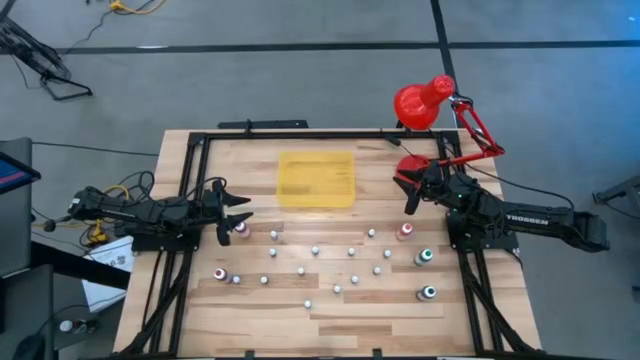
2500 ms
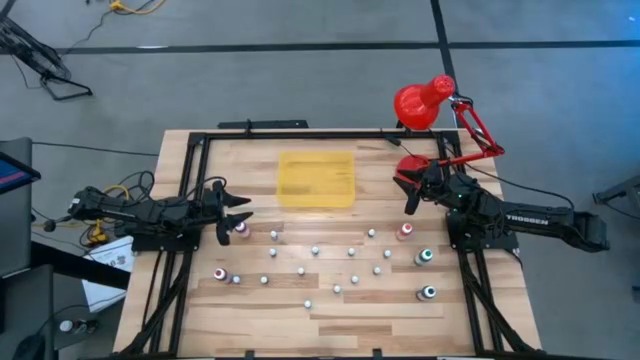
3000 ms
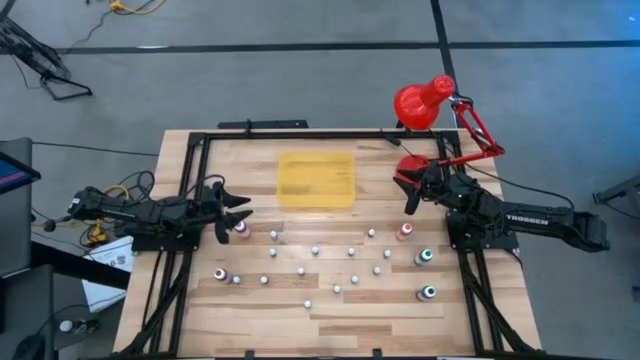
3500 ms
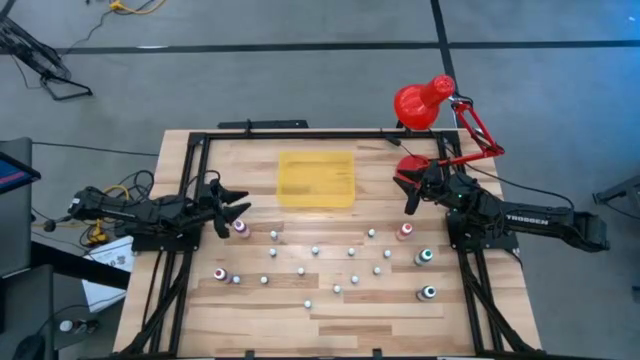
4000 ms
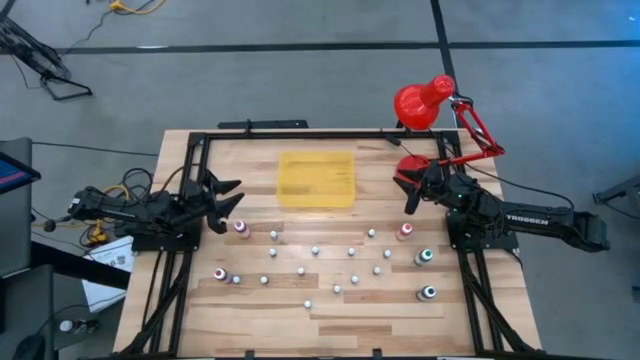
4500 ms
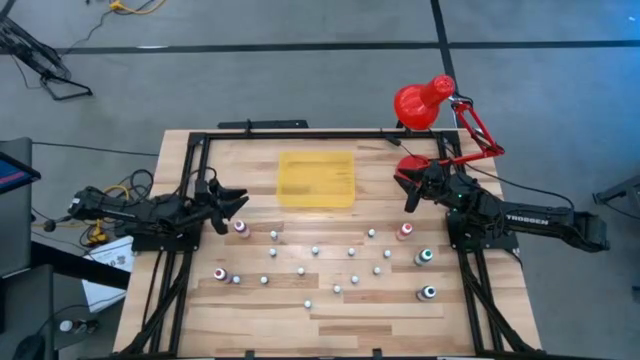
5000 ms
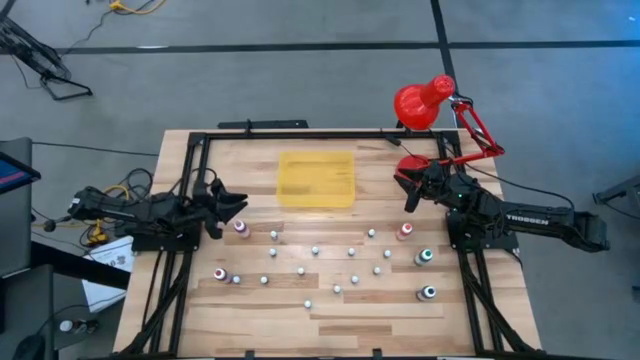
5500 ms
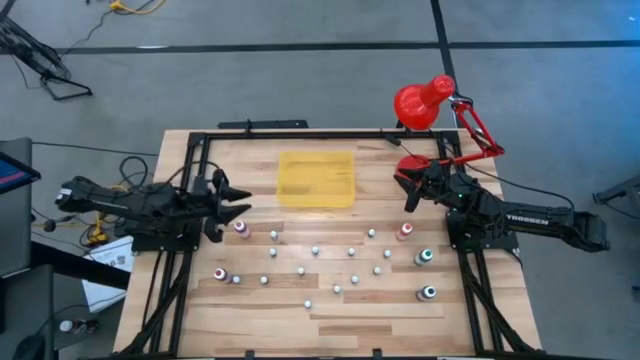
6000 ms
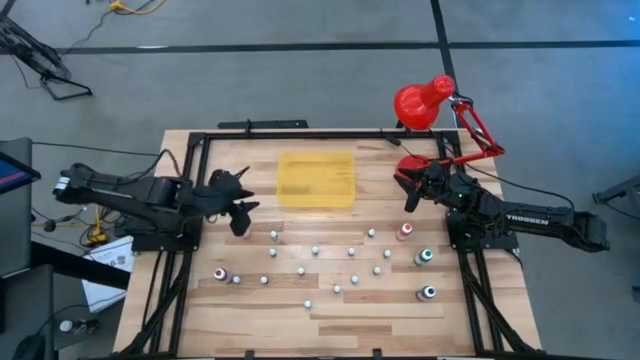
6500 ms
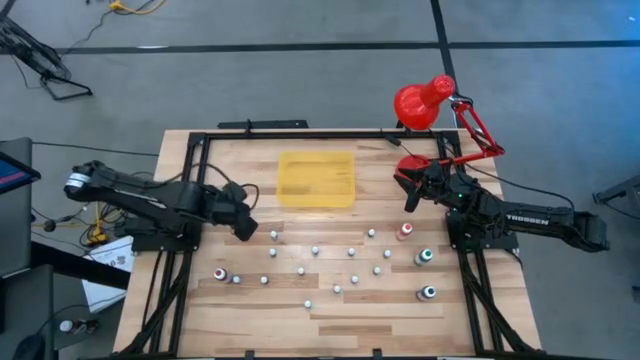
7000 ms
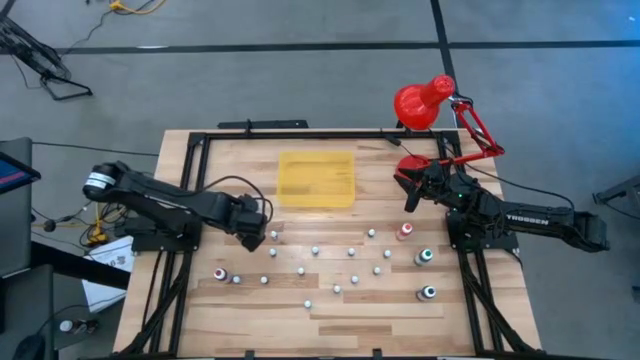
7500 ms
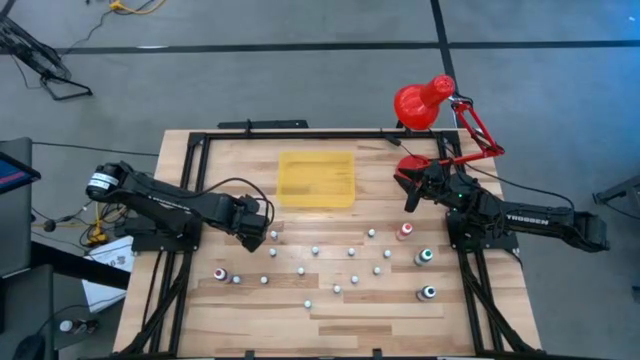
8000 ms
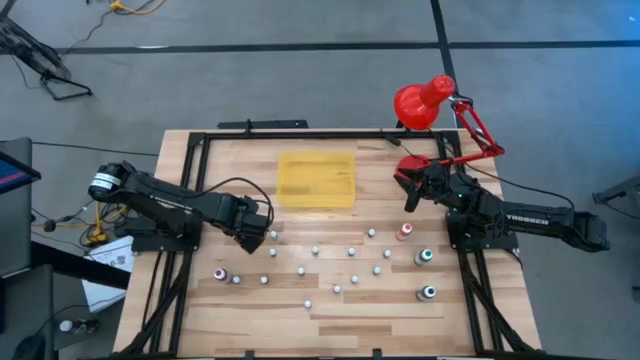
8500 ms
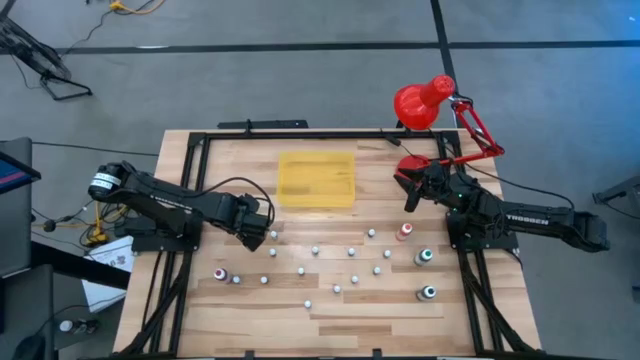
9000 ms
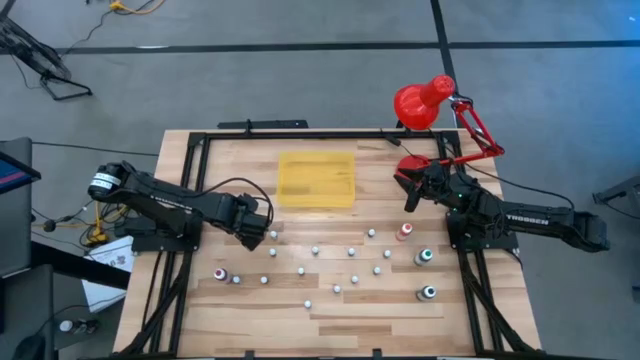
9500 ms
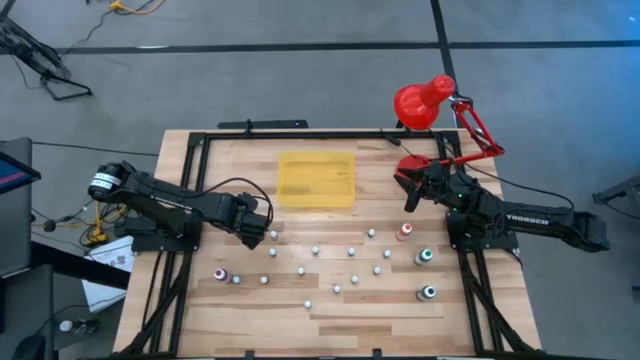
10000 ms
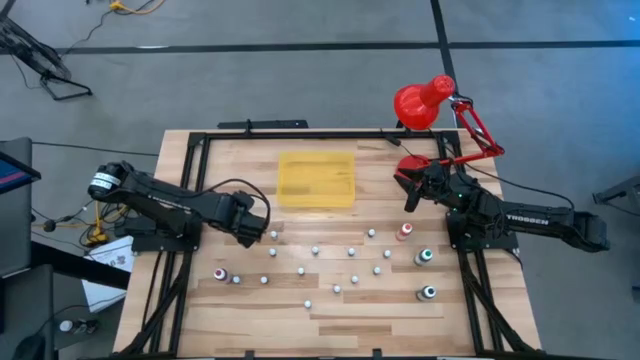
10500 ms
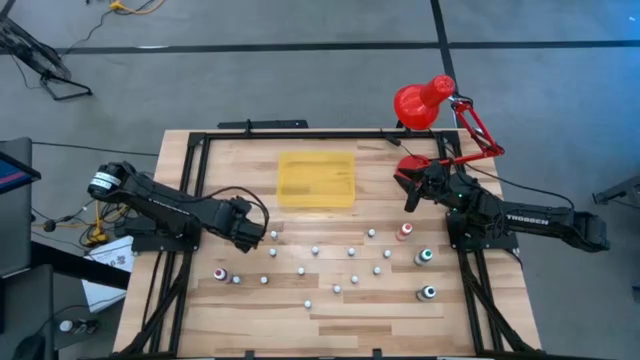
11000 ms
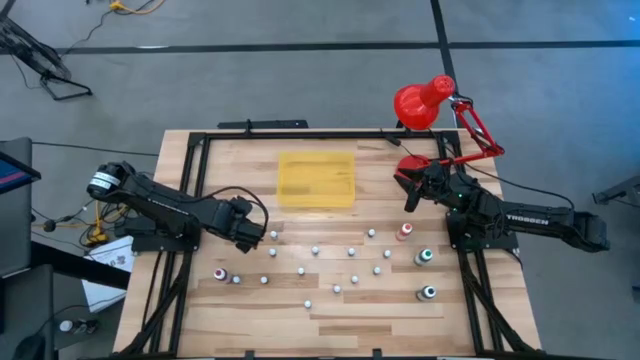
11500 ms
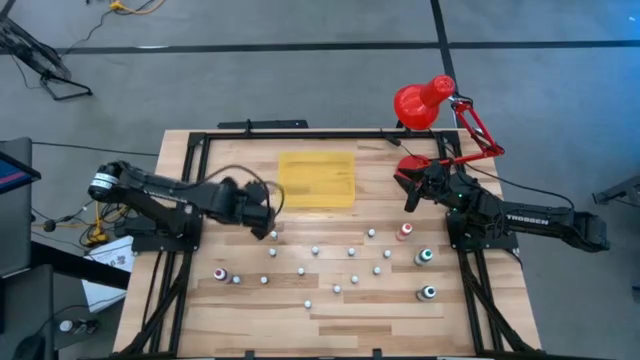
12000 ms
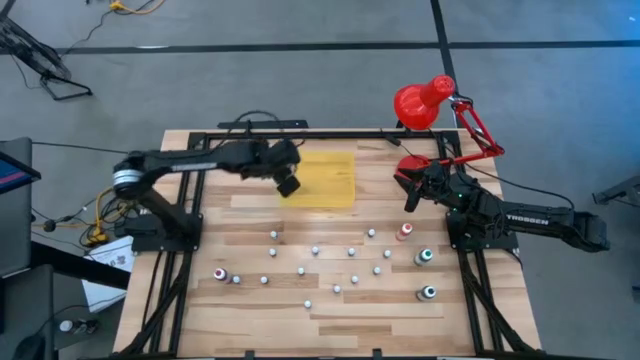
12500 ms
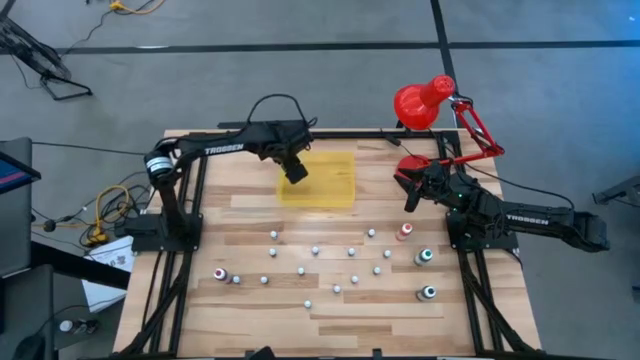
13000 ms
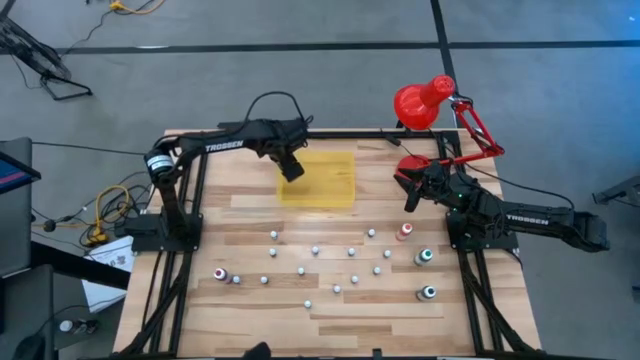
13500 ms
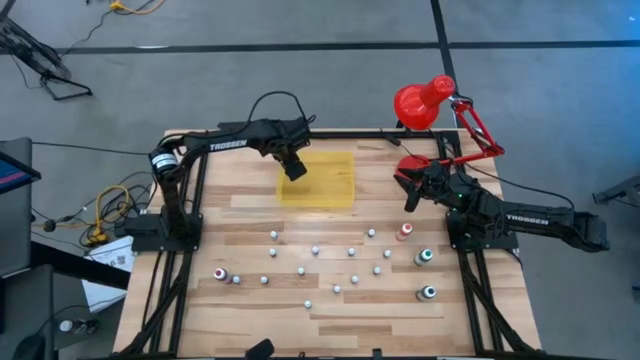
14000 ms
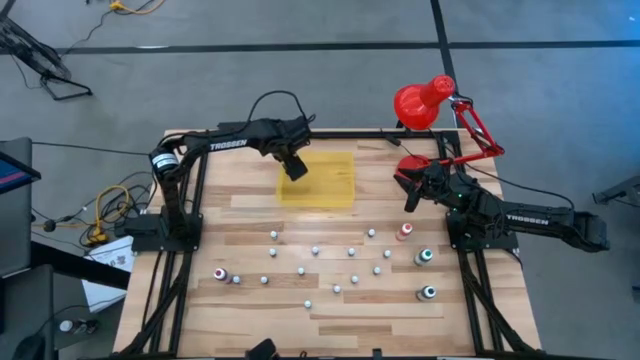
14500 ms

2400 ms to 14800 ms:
Task: Pick & Place food coloring
Put the large purple food coloring in the bin

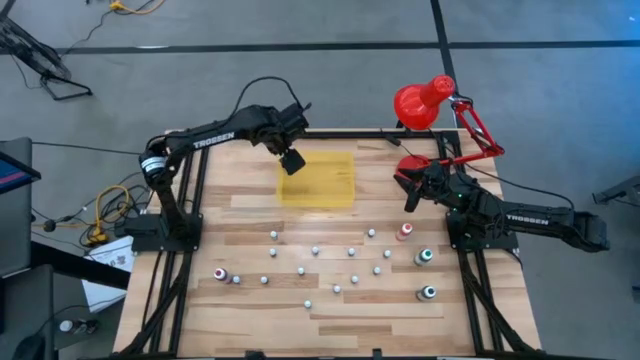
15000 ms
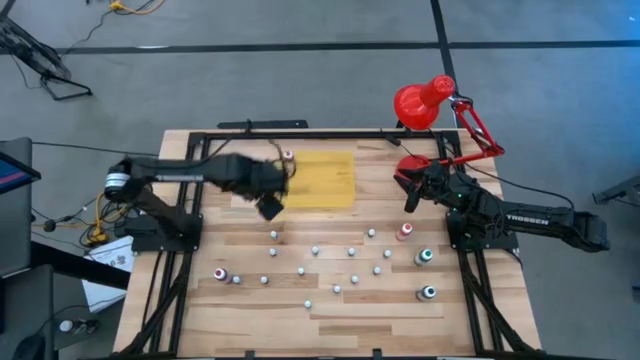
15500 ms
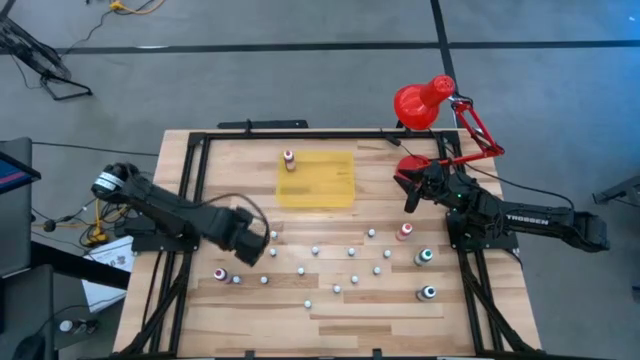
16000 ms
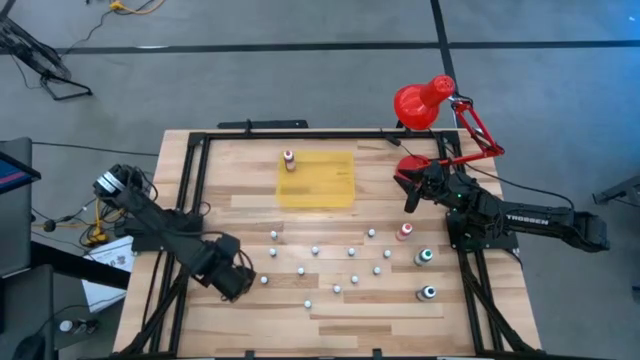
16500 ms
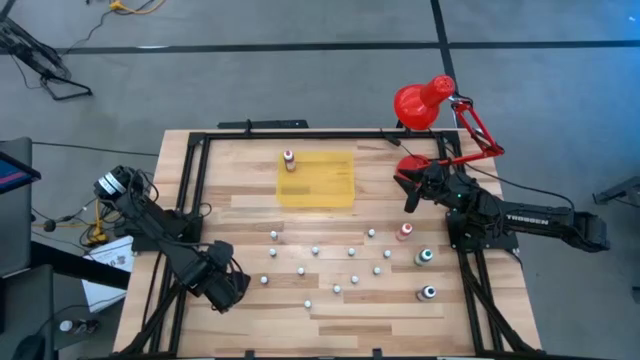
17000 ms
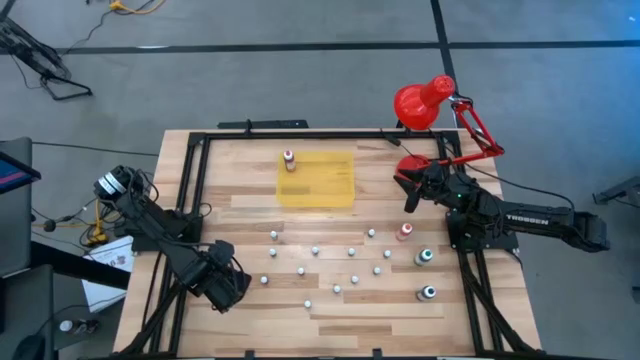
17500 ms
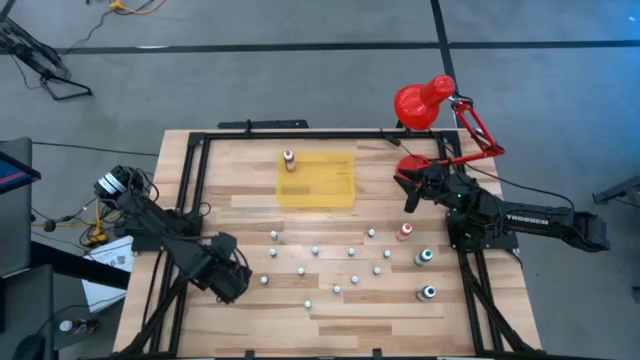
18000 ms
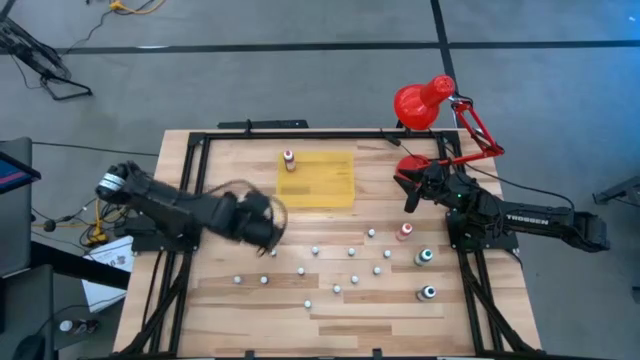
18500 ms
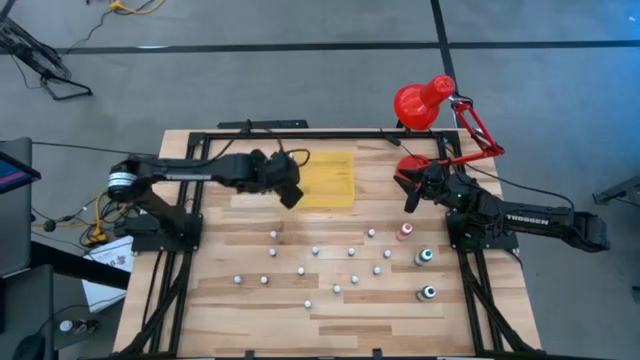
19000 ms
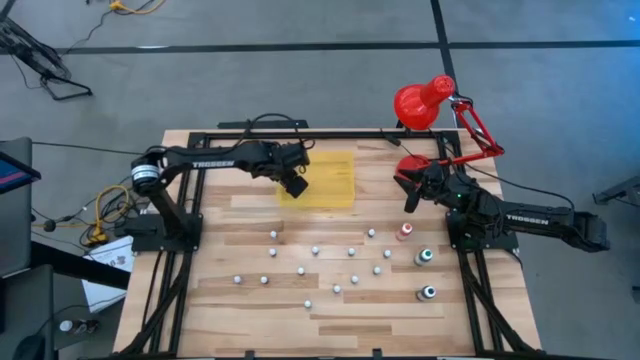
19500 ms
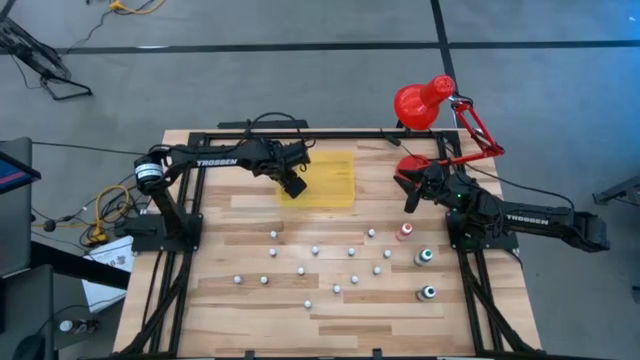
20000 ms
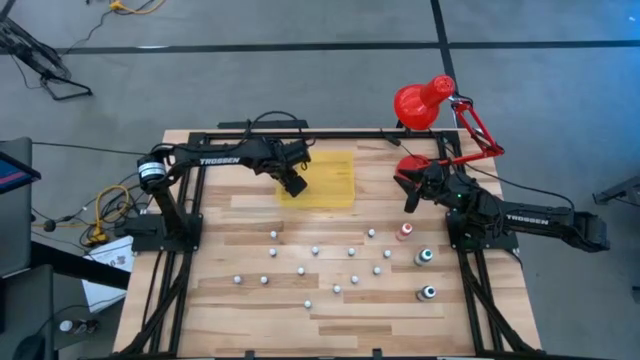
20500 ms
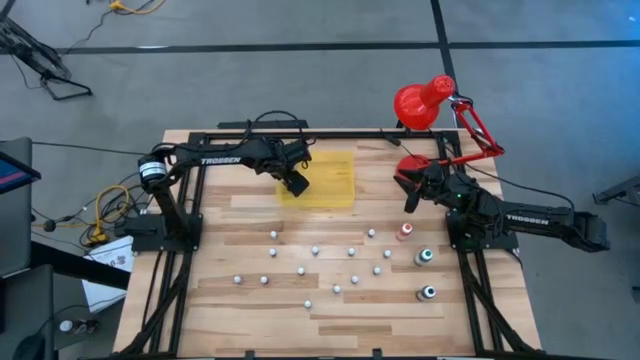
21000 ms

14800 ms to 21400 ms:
Put the large red food coloring in the bin
